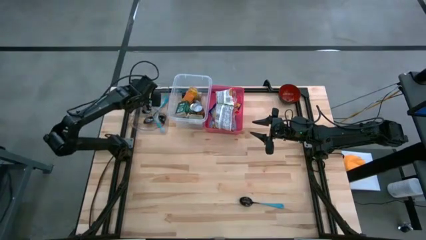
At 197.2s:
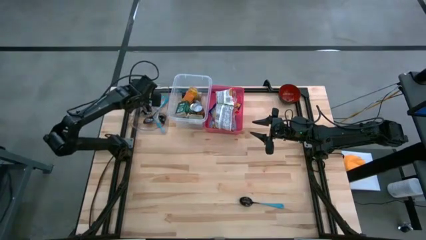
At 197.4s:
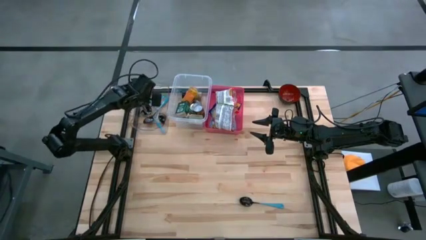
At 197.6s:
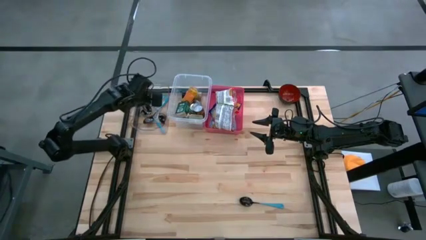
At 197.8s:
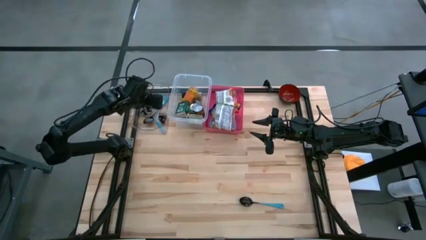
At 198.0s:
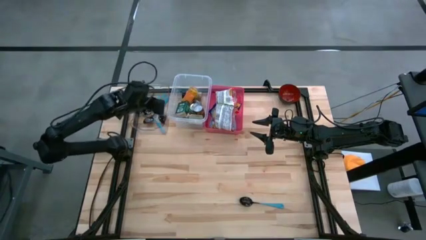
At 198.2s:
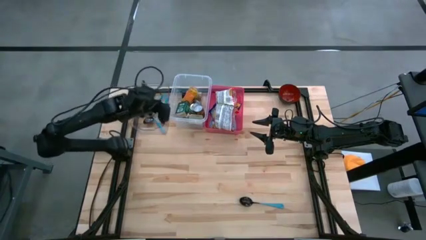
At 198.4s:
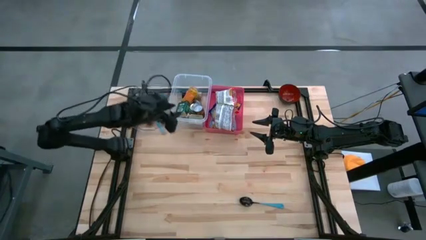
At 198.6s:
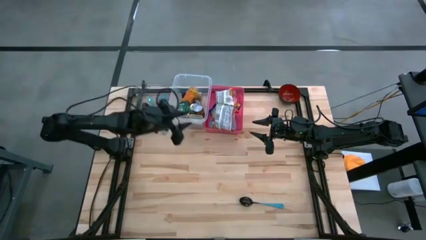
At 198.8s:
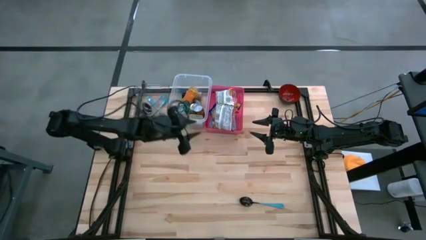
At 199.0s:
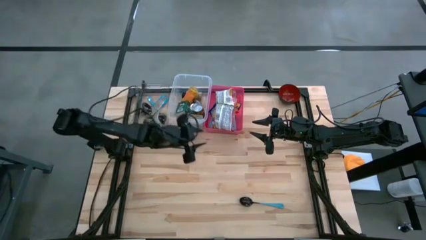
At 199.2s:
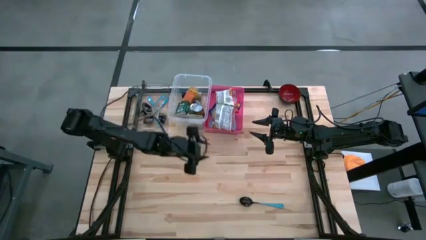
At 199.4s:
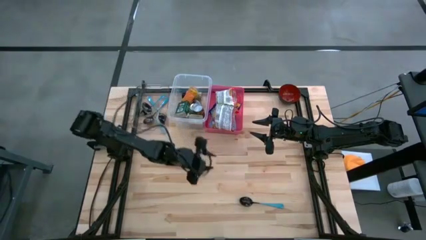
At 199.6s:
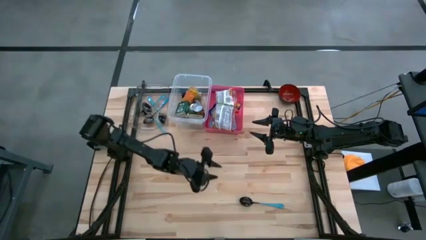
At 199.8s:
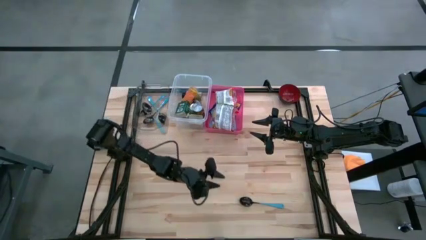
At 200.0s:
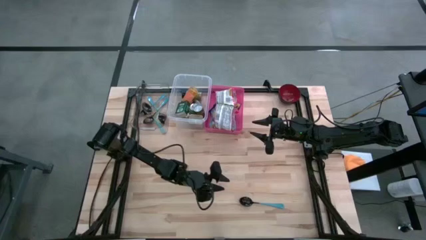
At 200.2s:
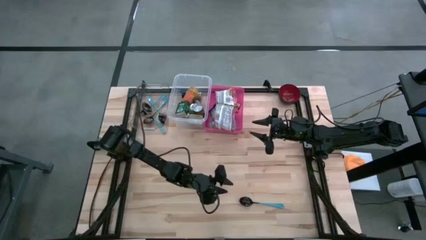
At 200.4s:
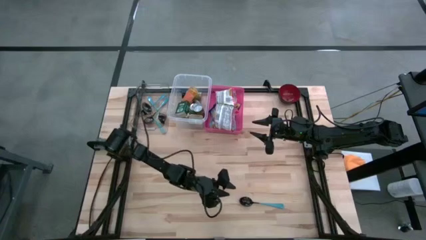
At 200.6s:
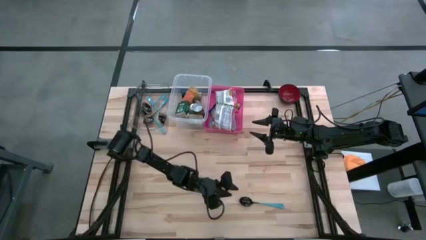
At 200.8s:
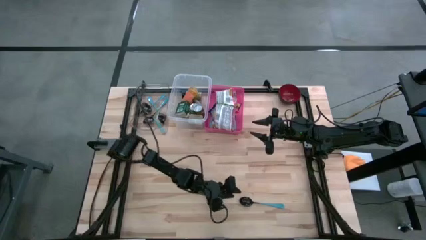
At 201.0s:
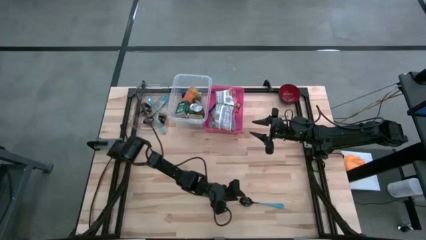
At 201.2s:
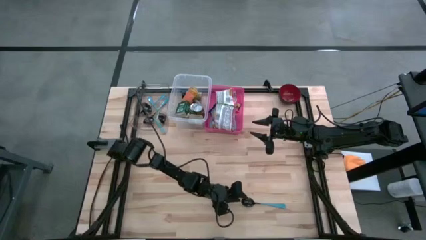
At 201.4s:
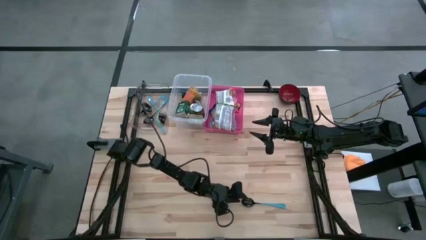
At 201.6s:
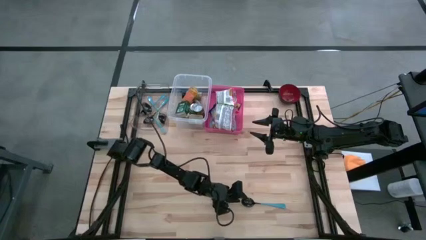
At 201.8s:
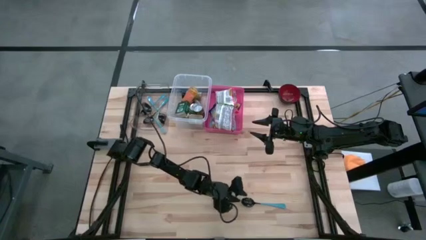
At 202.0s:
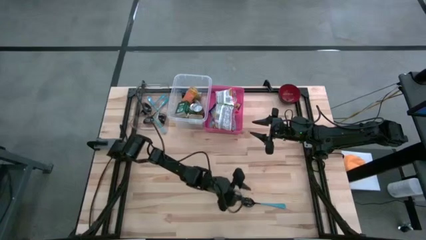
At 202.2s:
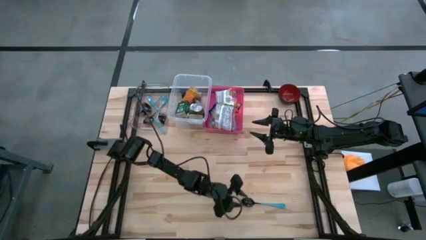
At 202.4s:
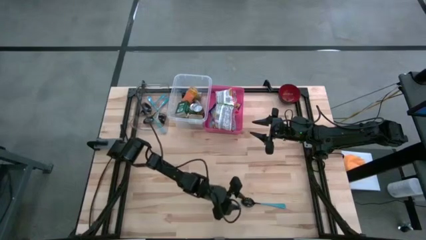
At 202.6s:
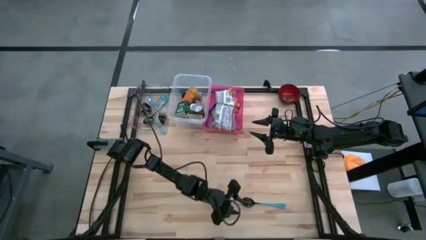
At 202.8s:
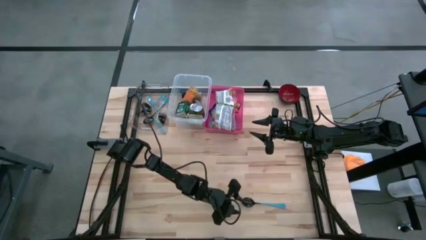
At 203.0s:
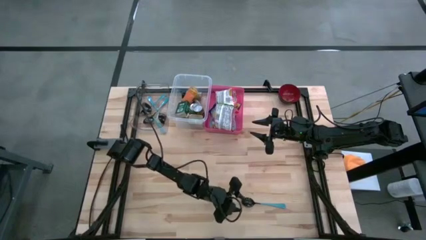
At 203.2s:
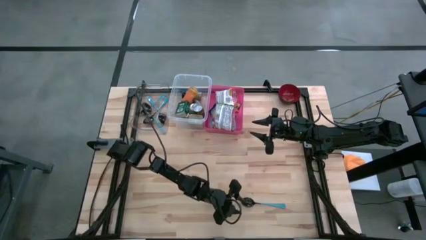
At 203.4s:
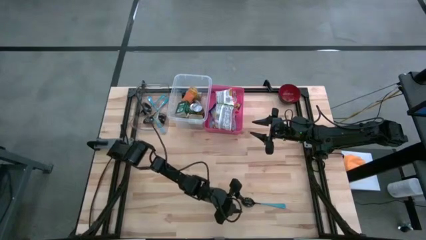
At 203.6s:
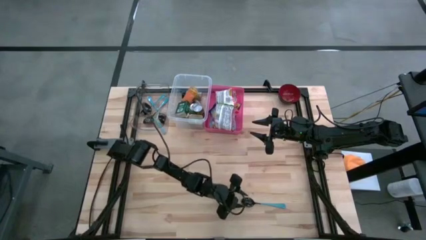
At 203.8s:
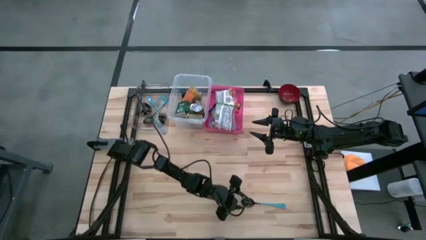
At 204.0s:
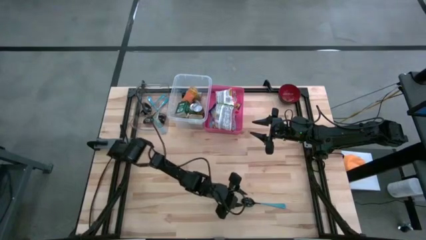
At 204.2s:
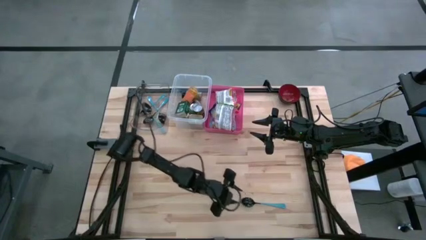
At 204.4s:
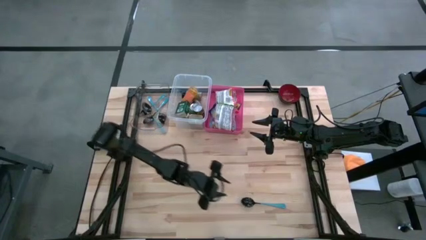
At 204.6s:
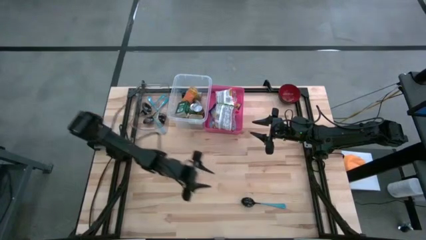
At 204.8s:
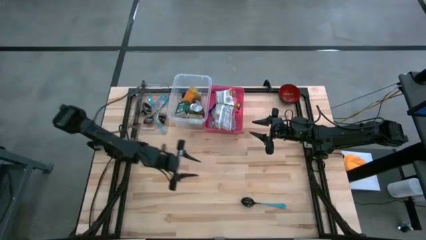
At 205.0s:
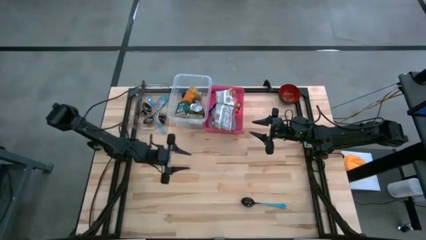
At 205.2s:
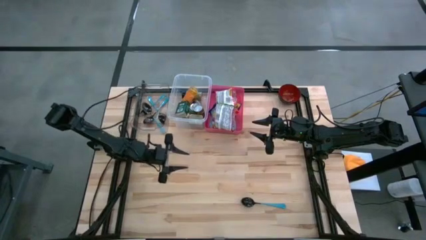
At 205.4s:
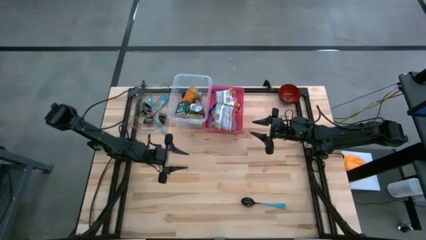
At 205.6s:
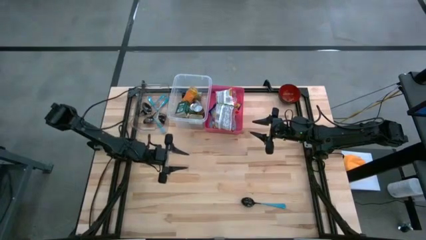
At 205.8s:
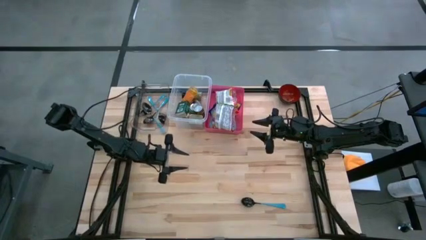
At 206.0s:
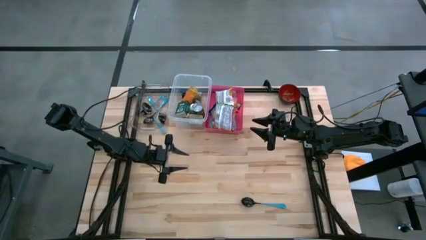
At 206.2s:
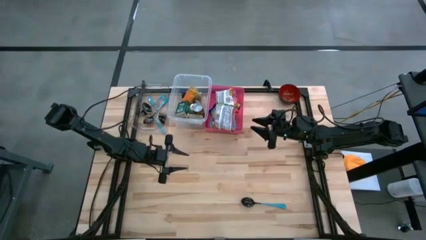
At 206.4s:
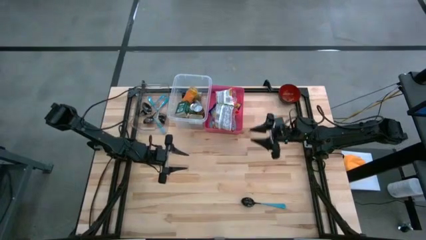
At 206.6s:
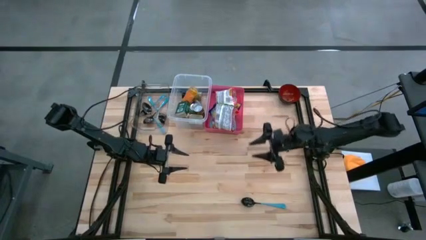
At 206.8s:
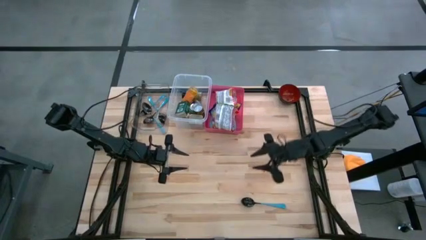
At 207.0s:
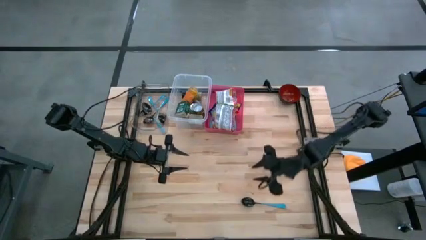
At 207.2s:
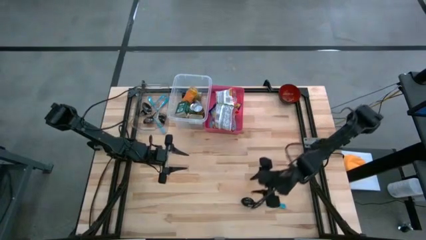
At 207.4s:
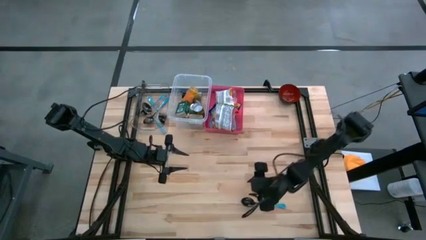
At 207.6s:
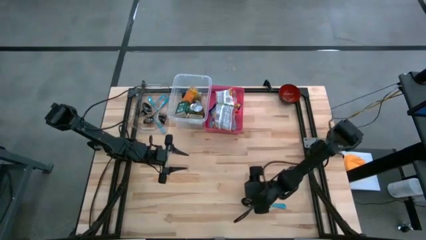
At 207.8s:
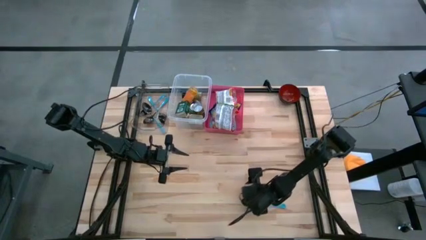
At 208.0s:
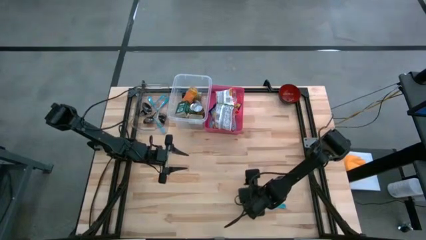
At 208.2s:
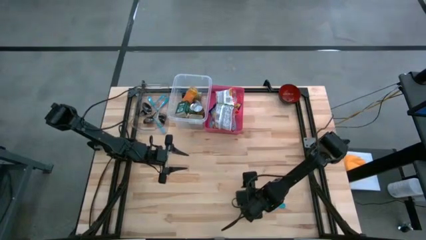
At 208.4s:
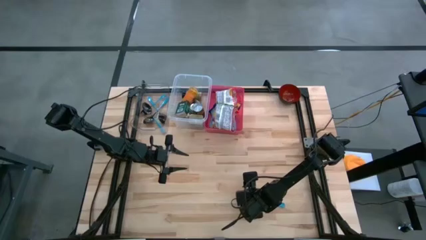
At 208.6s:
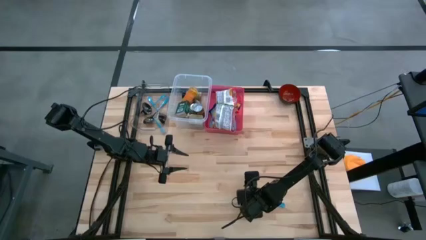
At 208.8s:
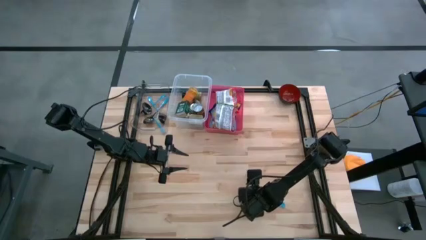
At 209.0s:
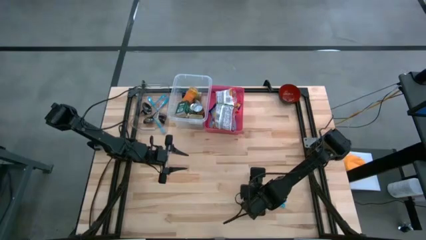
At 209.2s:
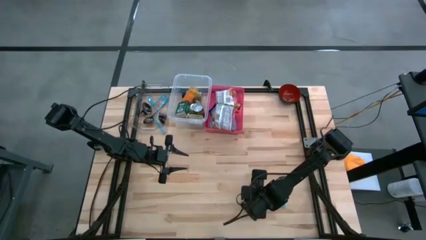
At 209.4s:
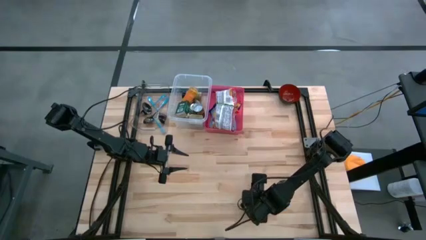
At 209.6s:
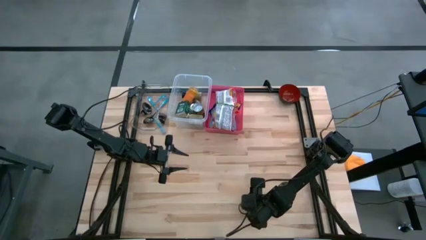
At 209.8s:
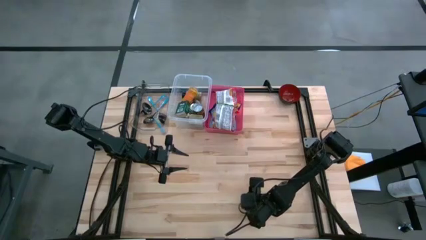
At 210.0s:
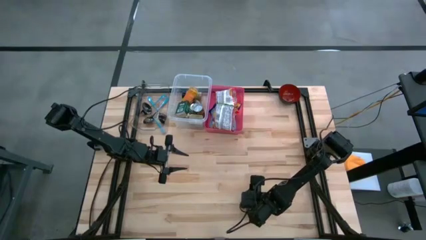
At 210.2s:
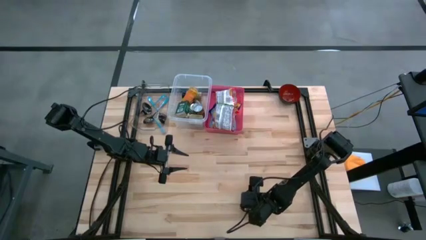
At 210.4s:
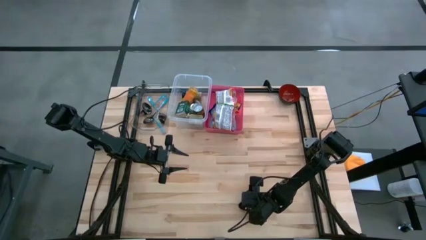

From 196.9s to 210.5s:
Put the blue spoon into the left transparent bin
